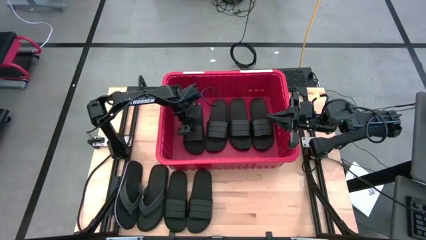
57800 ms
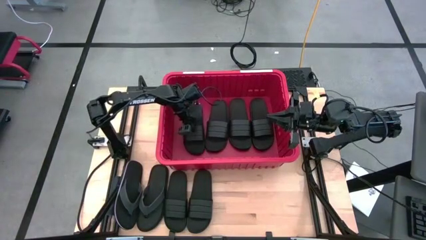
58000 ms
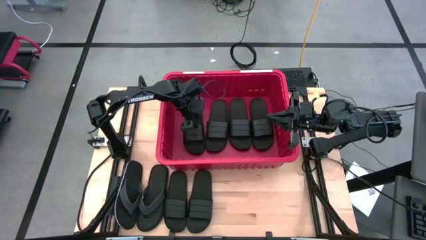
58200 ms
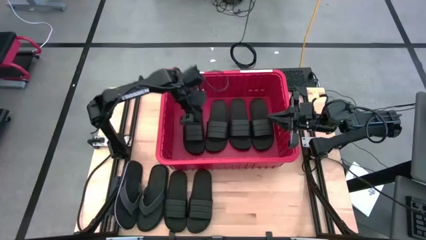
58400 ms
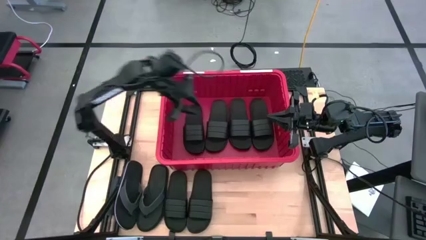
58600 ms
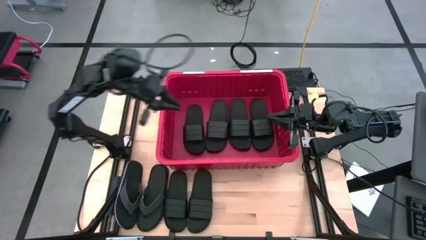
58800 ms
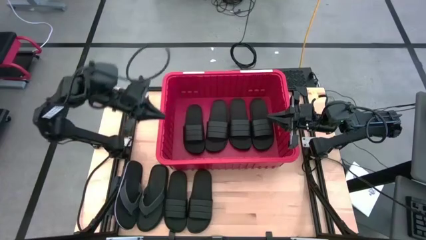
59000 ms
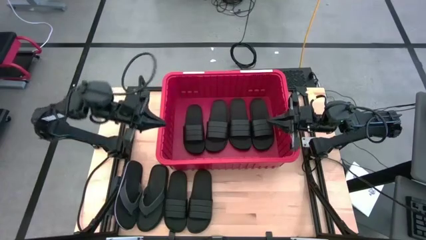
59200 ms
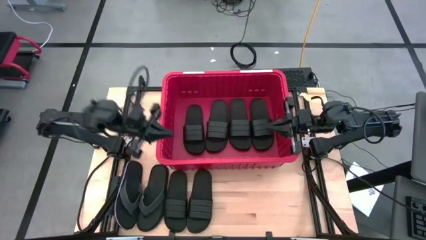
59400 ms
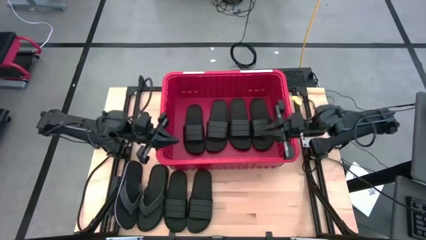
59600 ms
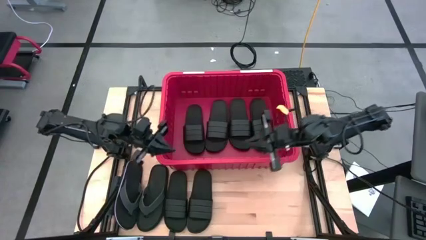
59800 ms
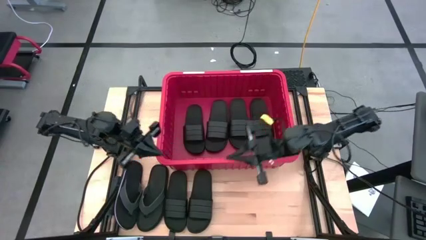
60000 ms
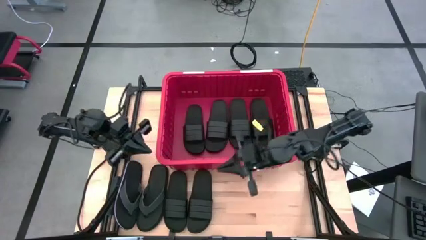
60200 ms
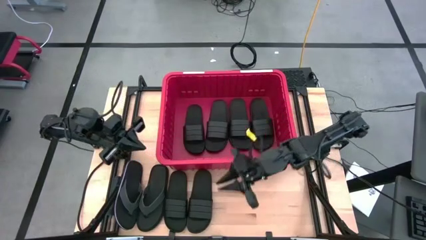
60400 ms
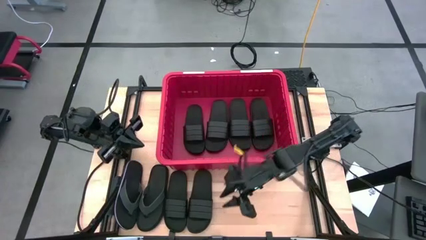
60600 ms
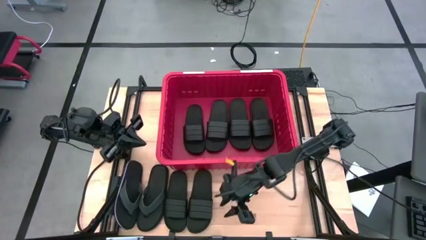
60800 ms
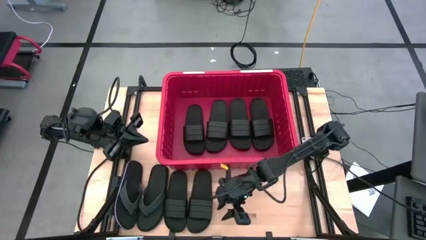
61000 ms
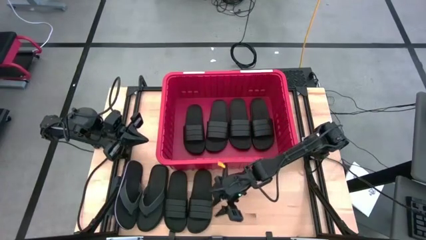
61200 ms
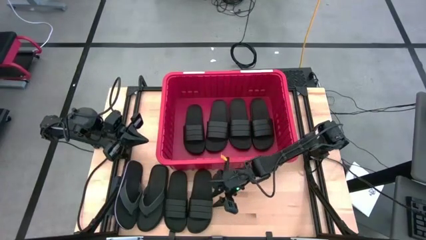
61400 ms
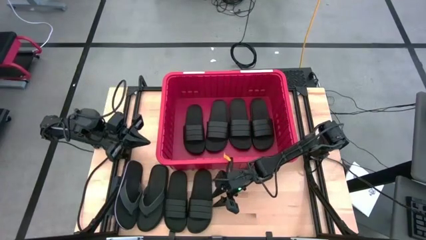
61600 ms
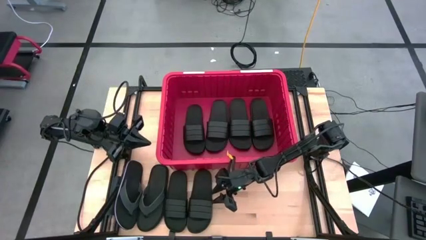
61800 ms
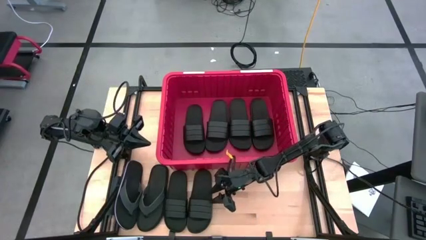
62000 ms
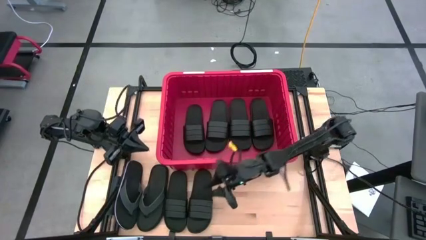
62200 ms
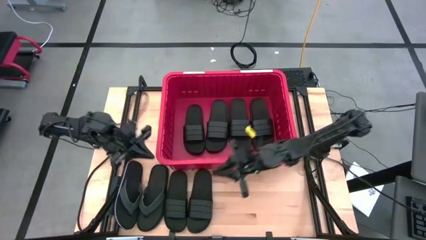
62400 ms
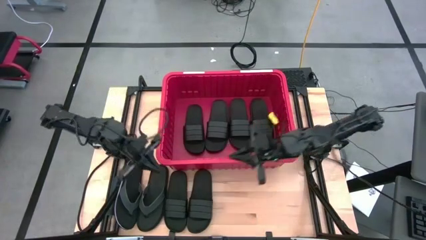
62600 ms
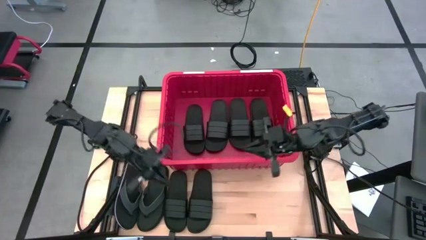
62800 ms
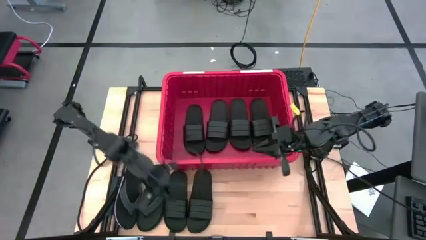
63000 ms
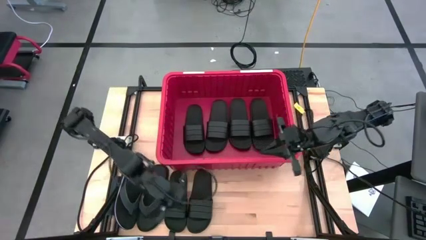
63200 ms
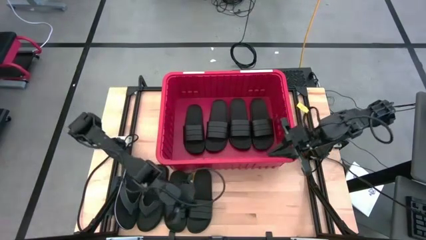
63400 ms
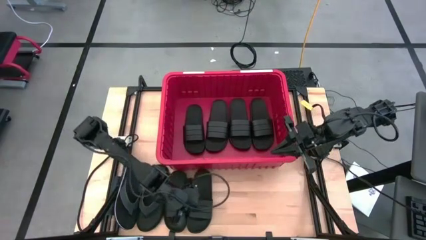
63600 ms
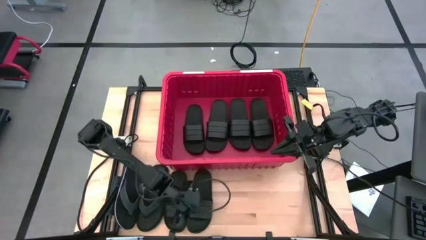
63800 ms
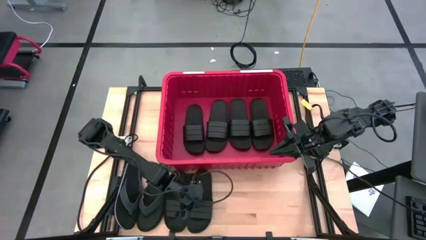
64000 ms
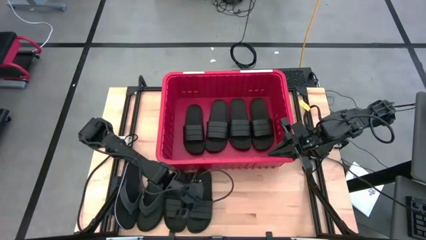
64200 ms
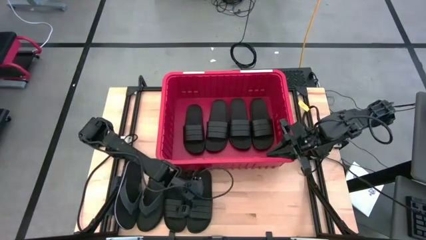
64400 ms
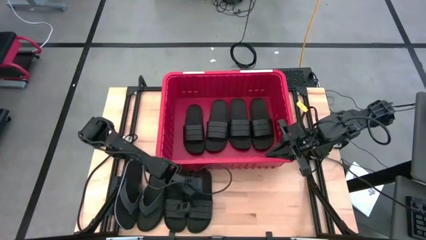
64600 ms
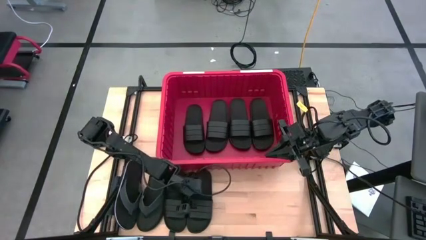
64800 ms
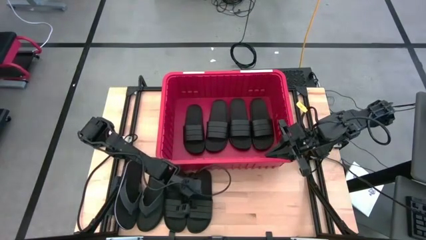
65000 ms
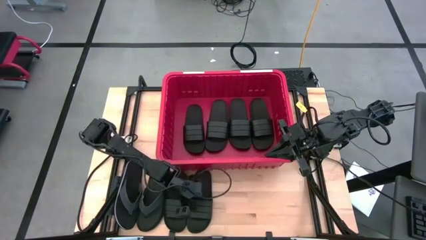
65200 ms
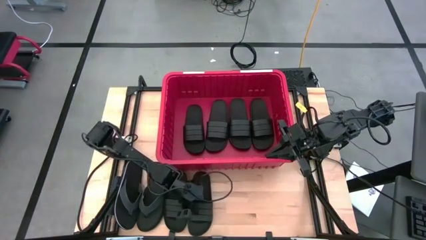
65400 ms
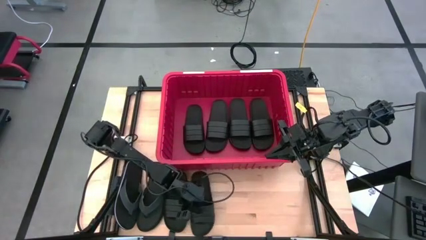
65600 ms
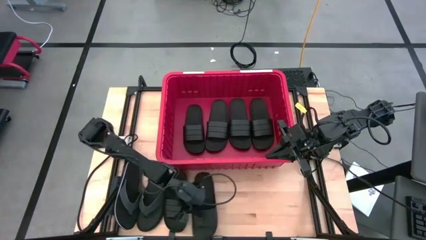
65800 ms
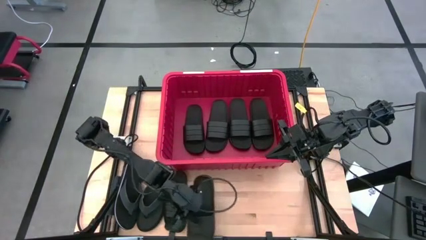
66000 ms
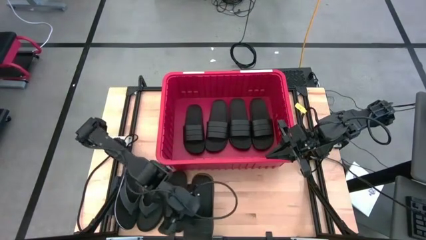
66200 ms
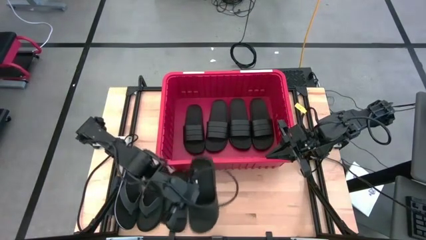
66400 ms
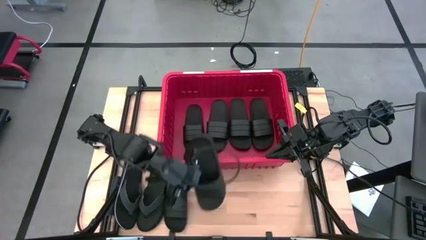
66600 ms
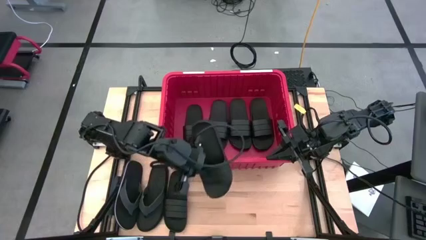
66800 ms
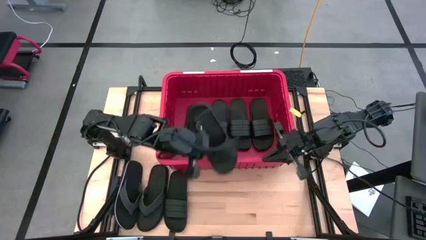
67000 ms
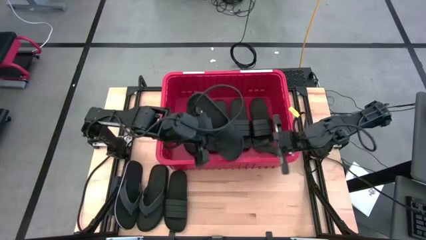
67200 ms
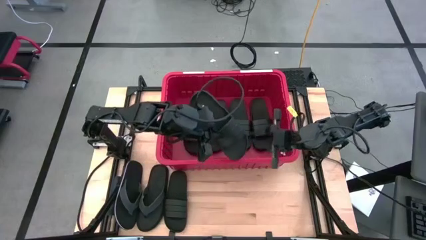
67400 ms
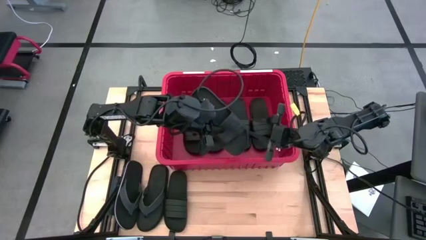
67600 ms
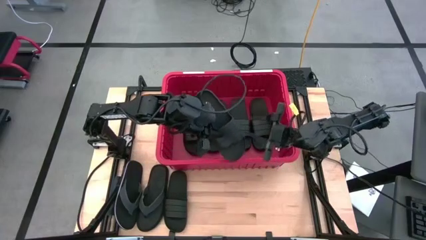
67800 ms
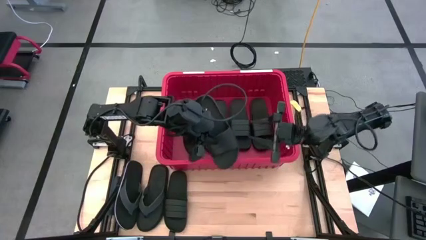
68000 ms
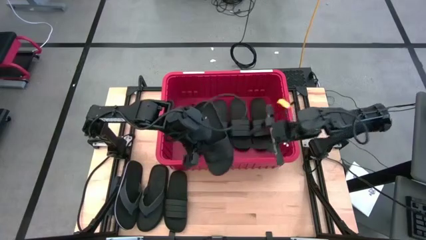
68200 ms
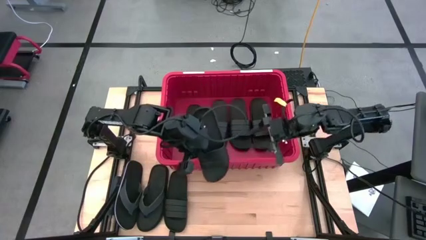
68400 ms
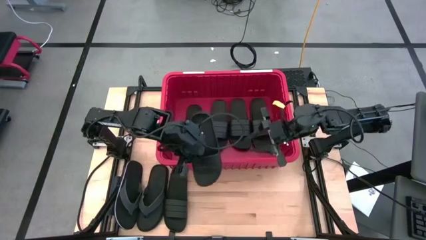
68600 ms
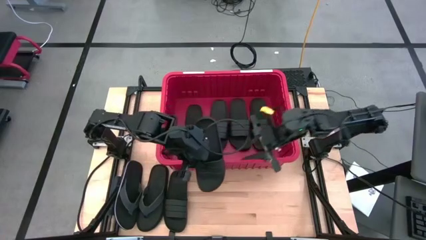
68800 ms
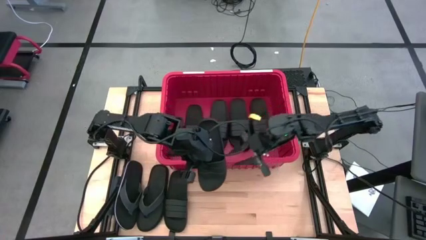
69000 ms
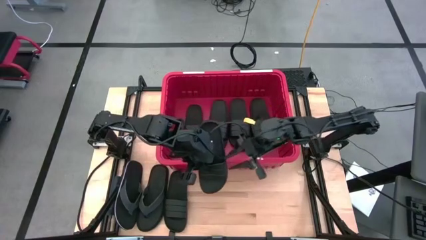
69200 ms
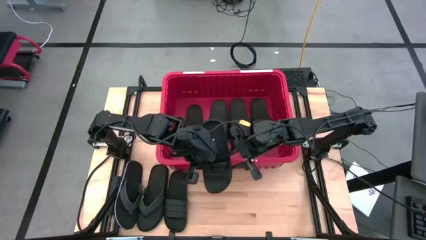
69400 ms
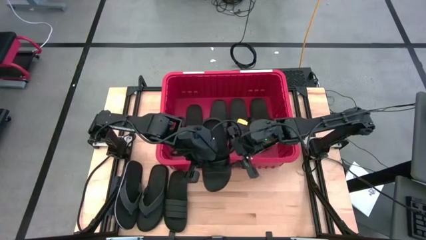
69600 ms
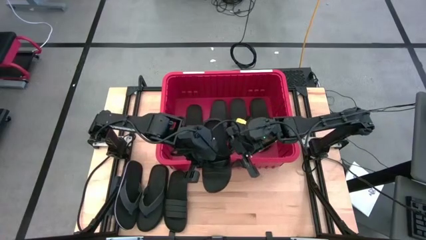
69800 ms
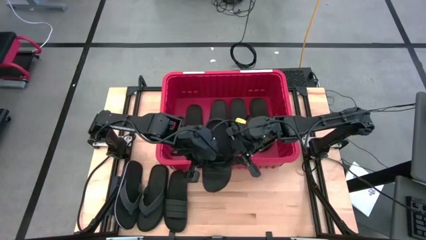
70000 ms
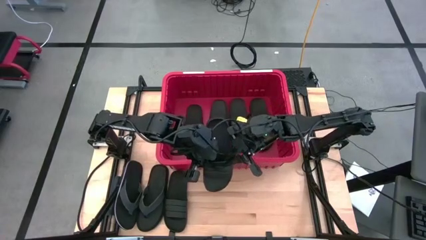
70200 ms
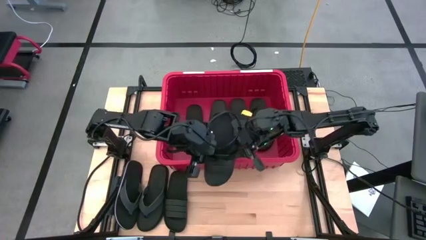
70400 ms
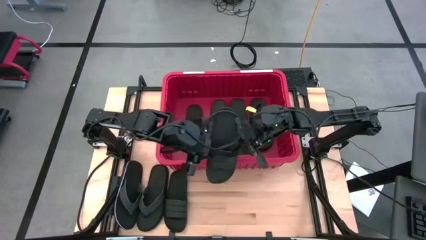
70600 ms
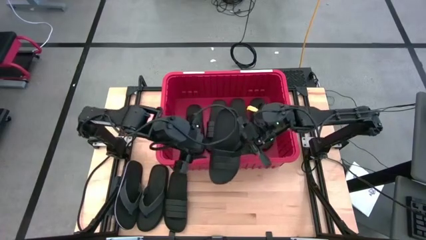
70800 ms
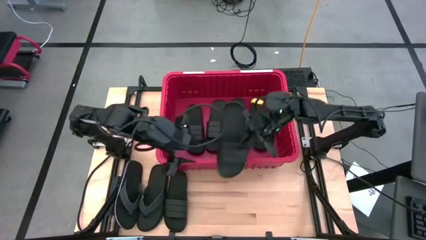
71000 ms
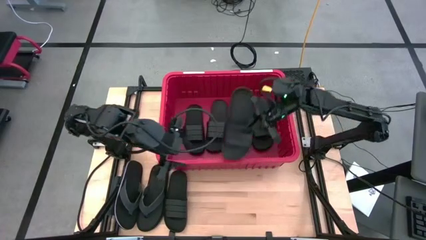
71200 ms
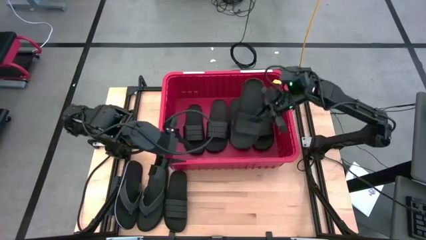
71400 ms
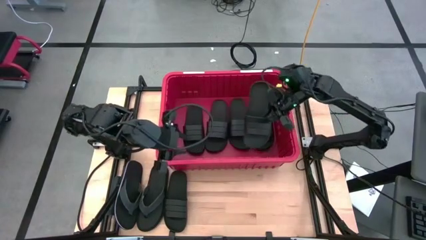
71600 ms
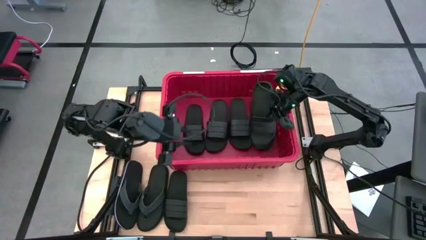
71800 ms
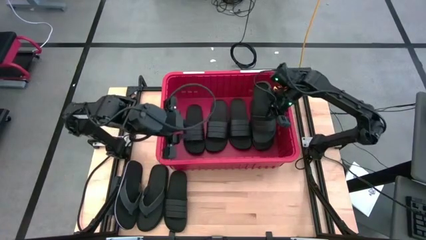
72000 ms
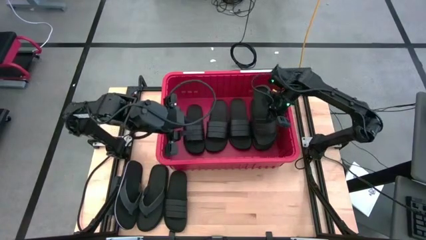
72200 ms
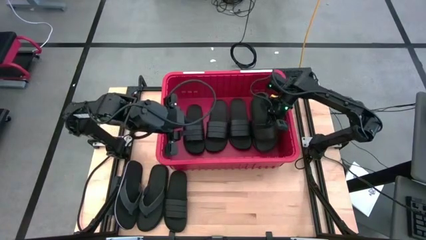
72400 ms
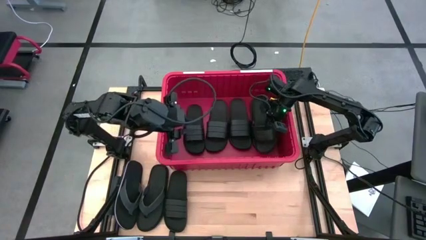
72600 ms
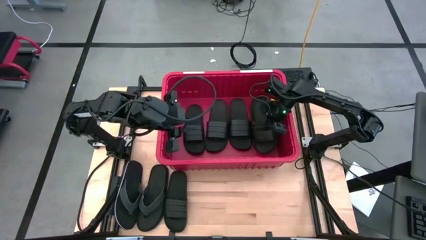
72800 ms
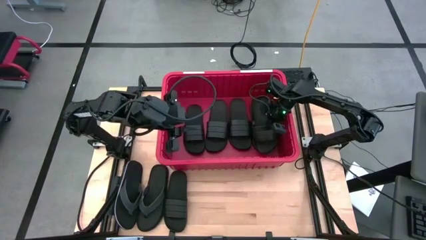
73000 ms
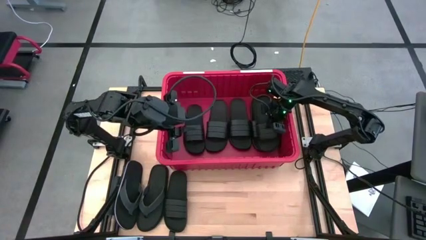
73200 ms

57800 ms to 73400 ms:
Task: Pick and place slides into bin
Put the black slide into the red bin

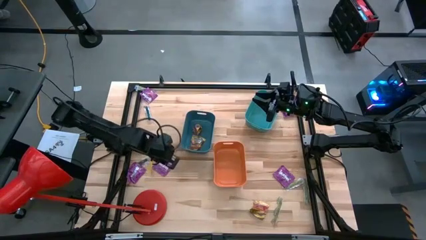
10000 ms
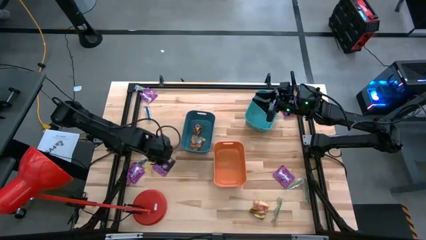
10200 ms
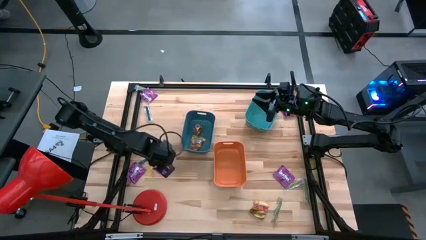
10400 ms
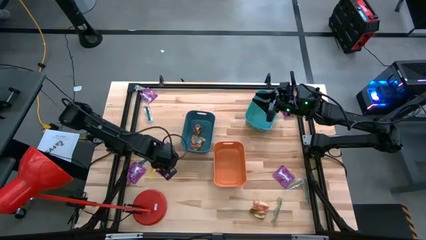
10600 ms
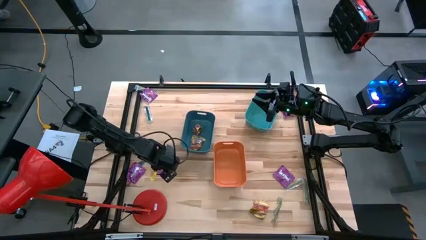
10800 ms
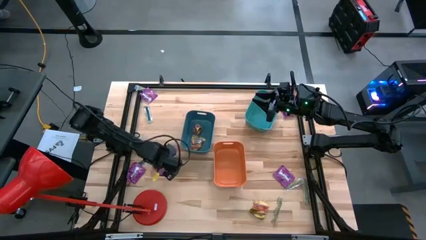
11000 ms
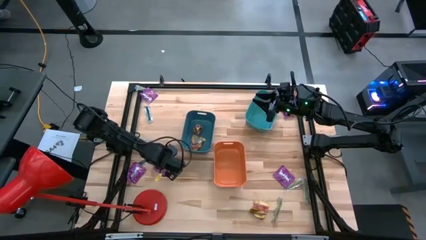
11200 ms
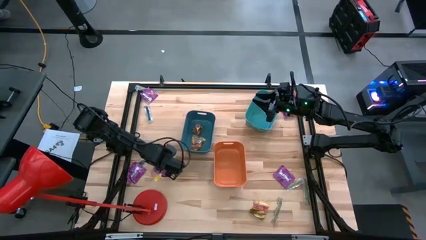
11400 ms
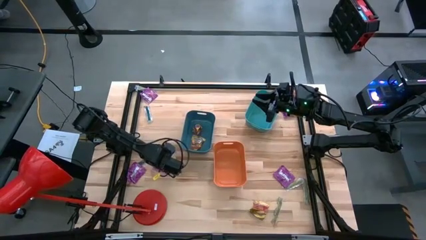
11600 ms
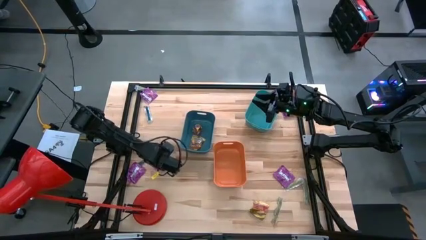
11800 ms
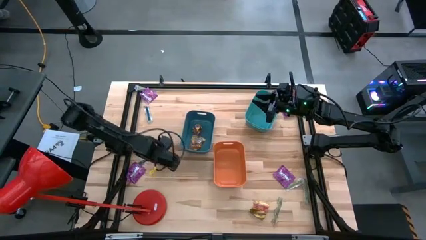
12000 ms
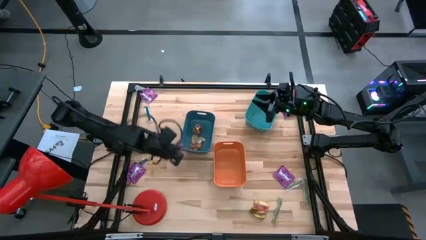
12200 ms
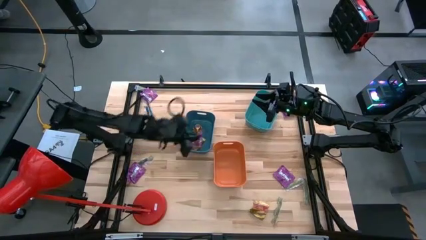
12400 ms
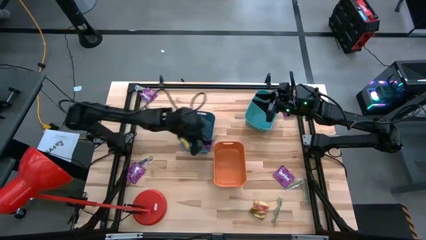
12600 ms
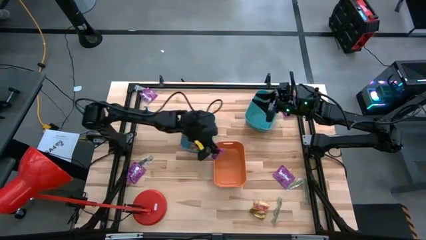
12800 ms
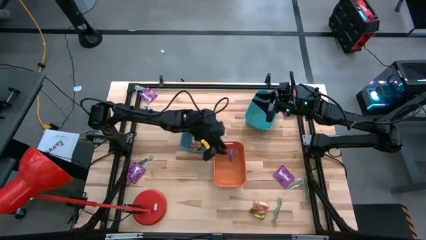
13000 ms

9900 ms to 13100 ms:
Task: Sort candy
Put the violet candy into the orange bin
